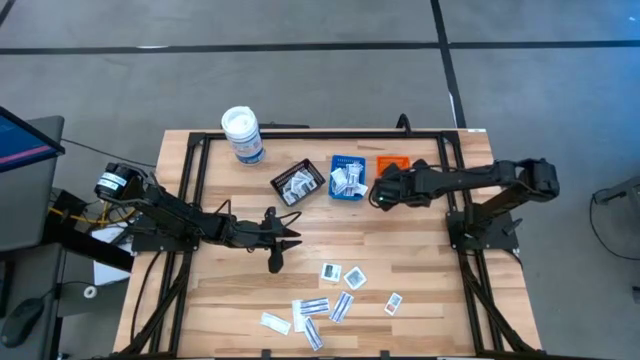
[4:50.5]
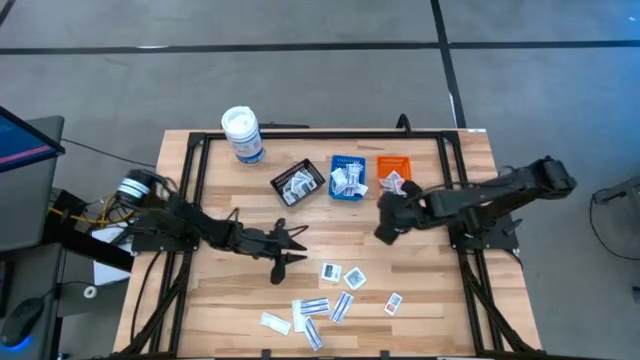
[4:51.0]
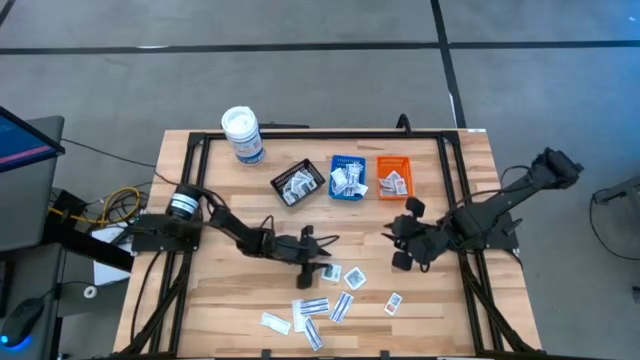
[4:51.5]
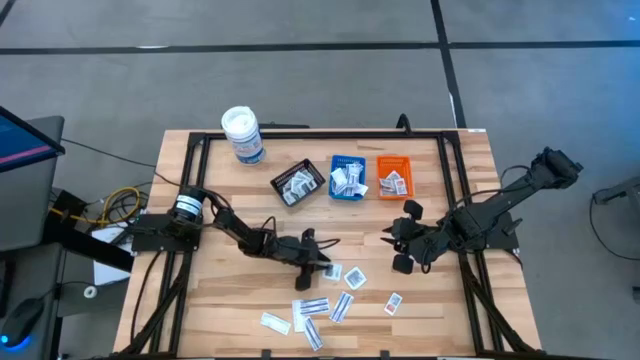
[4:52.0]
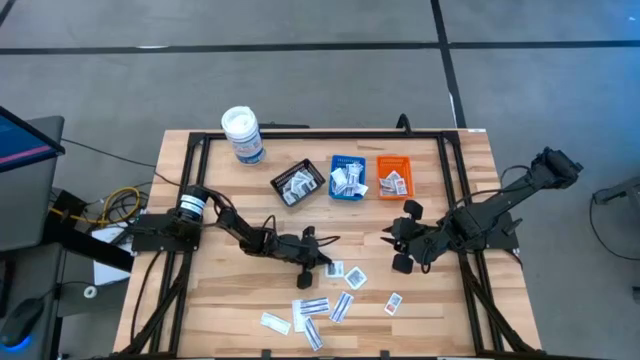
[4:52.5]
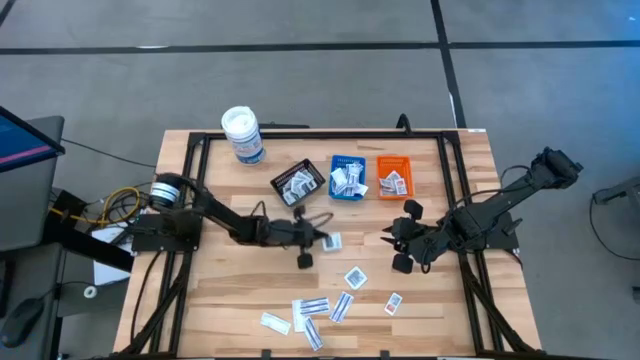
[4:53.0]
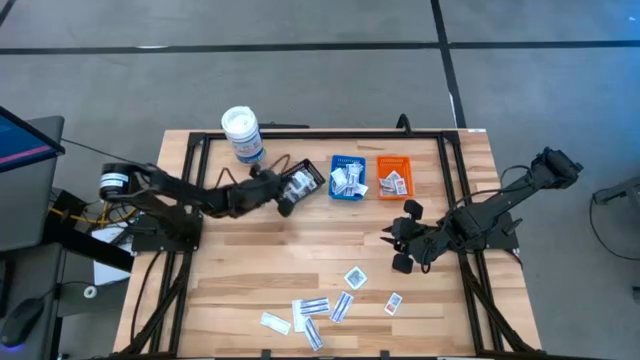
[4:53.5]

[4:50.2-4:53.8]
Task: Pick & Place First Aid Supplies
Put the black towelette pack into the black bin

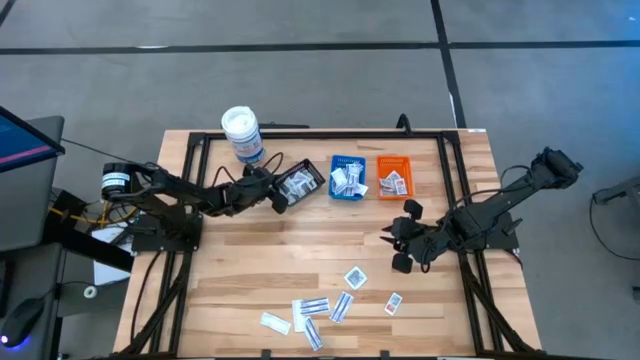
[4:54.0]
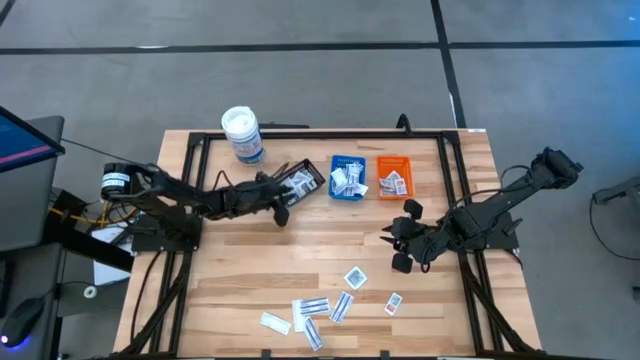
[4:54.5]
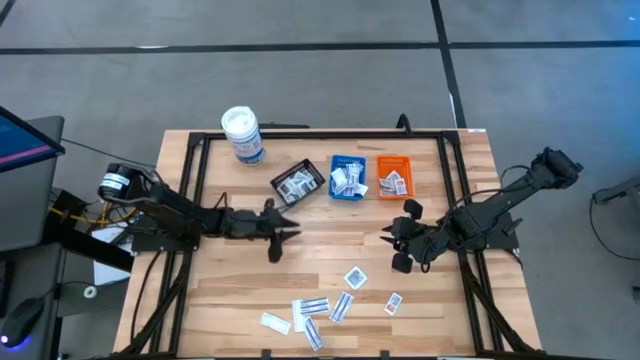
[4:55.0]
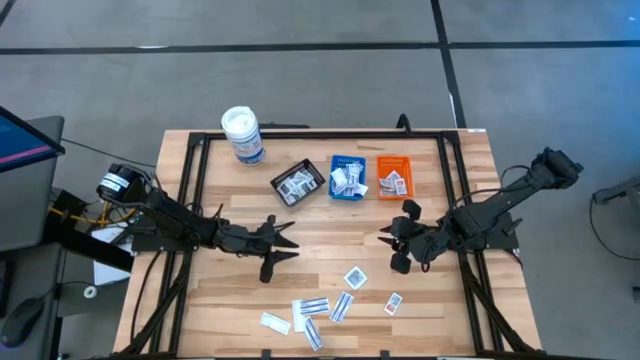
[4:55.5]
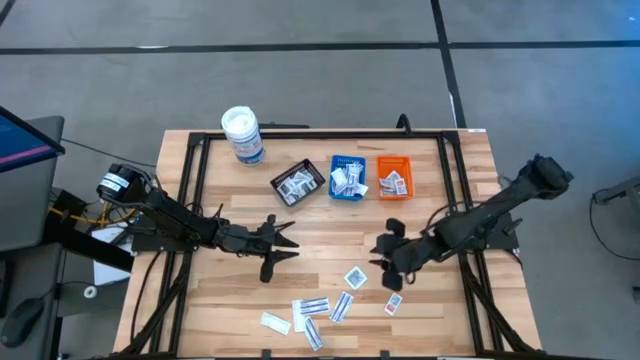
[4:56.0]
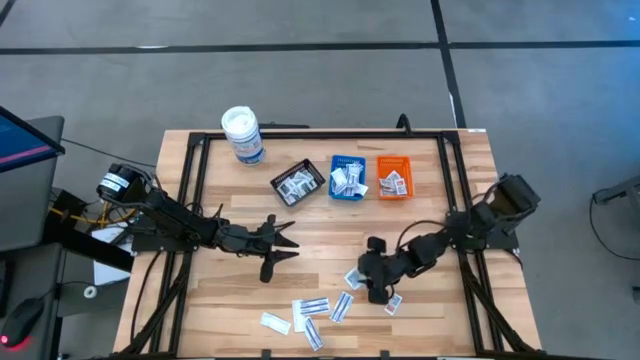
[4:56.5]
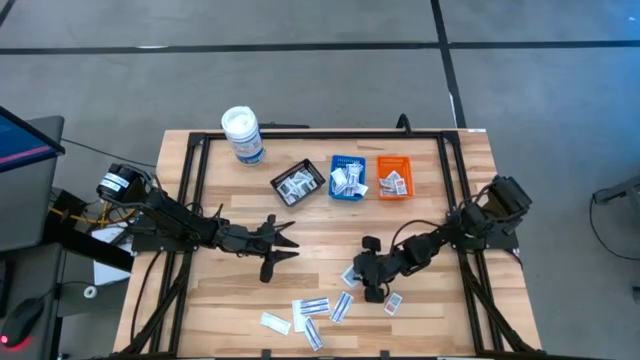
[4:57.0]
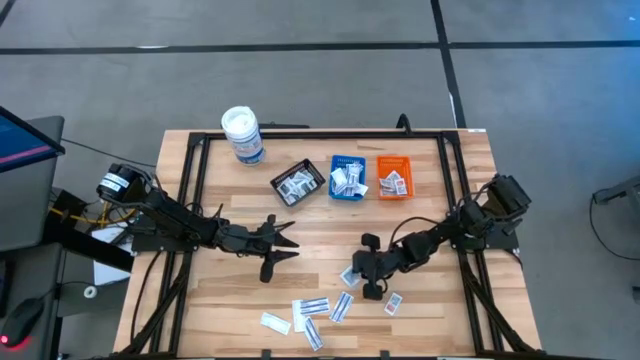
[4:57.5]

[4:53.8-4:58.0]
Put the black towelette pack into the black bin

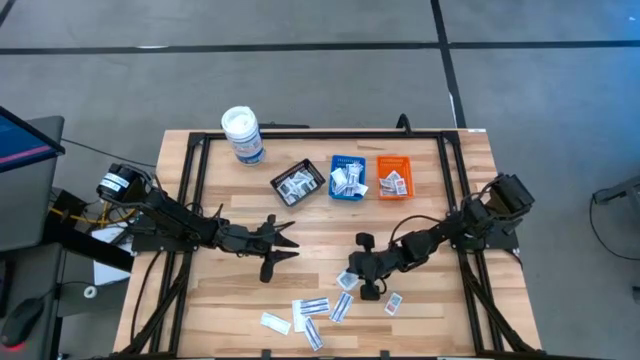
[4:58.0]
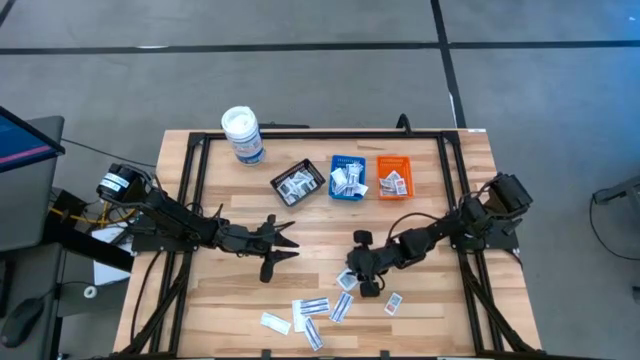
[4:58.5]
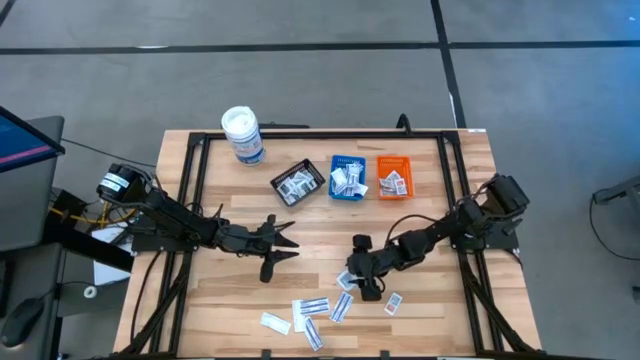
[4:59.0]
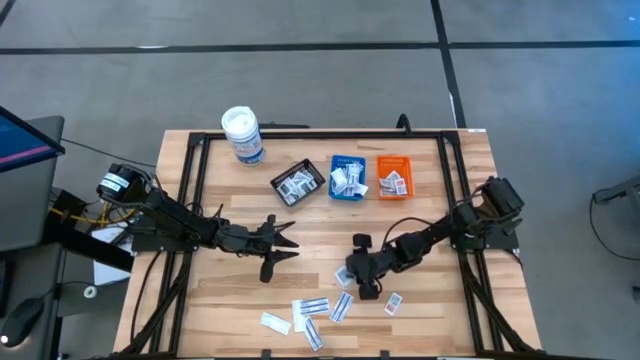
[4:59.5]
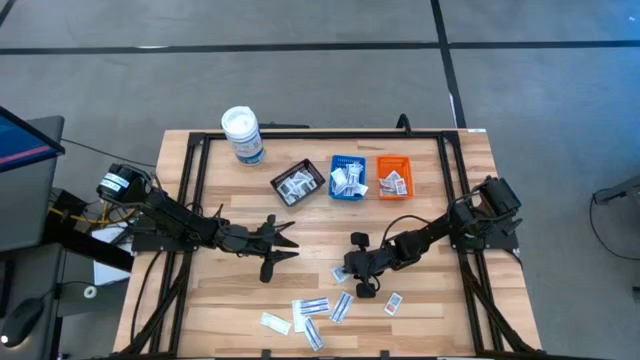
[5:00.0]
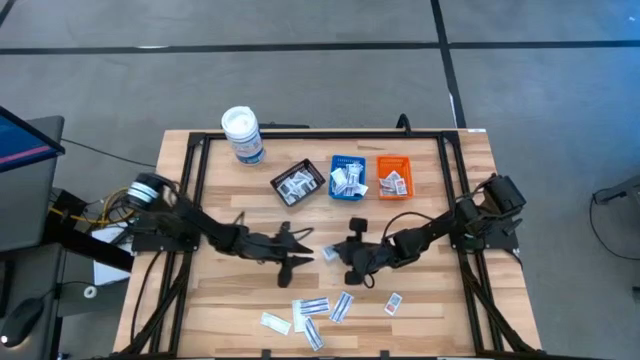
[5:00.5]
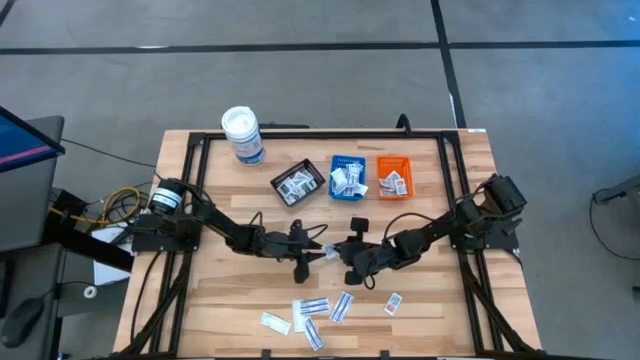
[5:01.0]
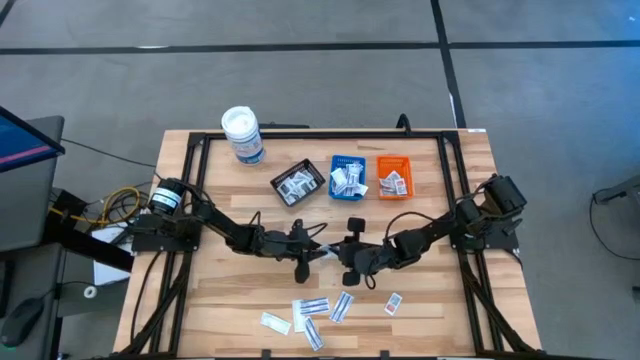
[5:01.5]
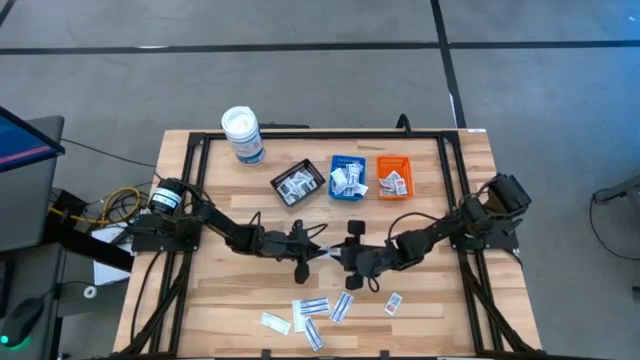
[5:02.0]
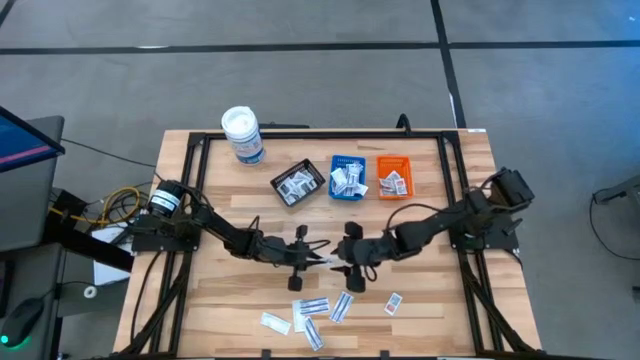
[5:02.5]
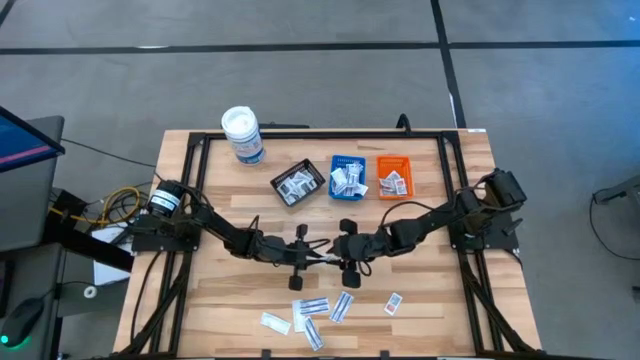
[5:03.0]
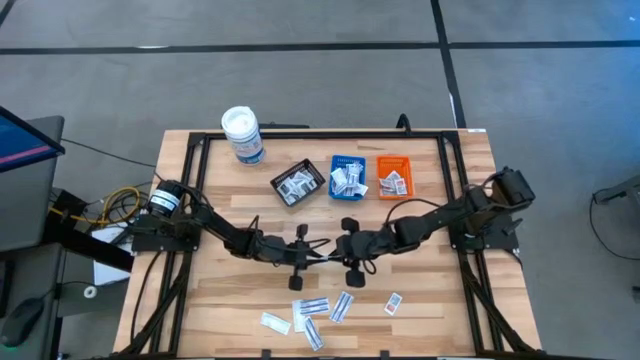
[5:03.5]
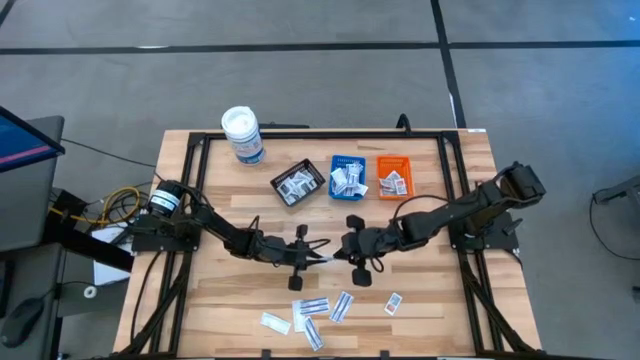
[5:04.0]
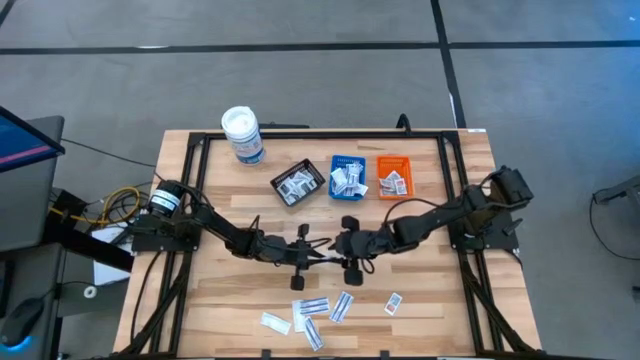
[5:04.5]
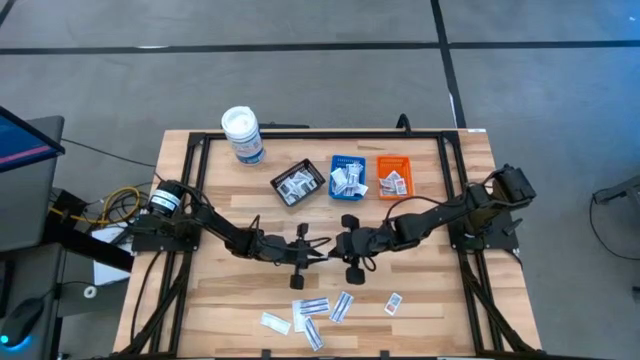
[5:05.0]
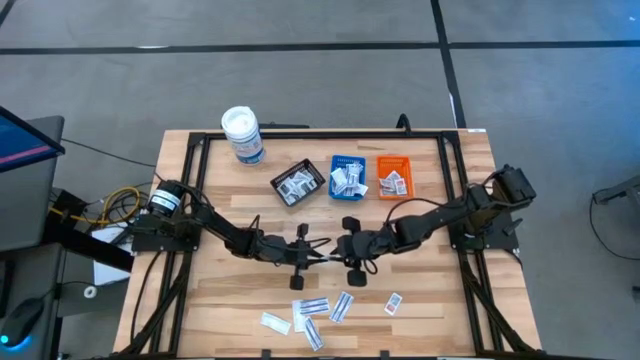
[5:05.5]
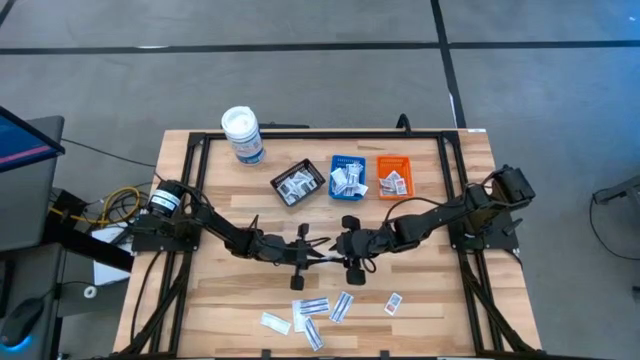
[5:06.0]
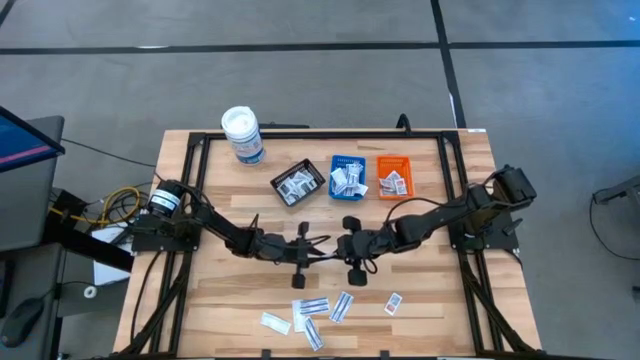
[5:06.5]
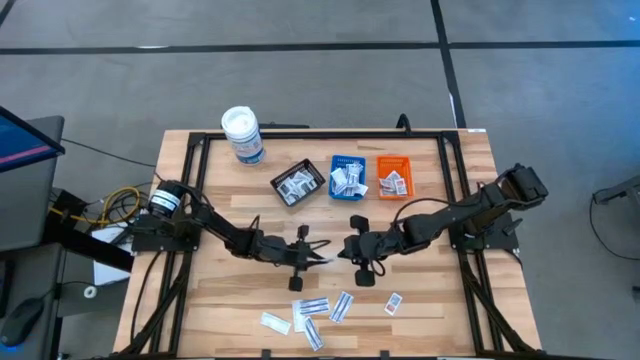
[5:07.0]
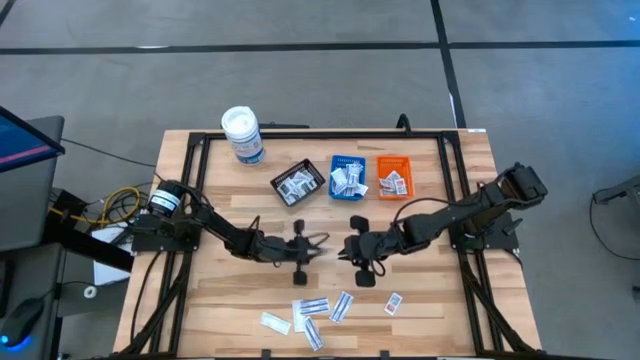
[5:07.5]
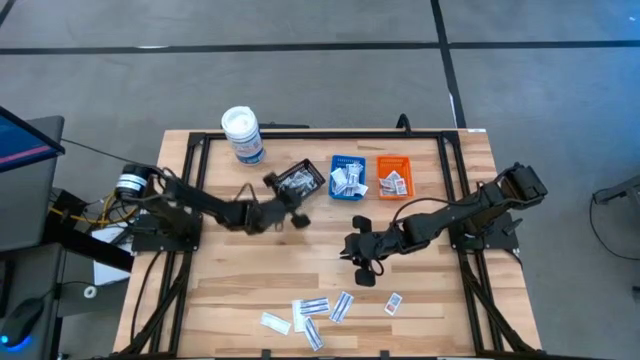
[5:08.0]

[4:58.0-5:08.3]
Put the black towelette pack into the black bin

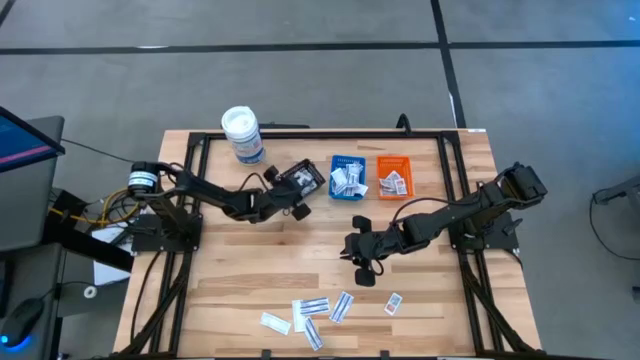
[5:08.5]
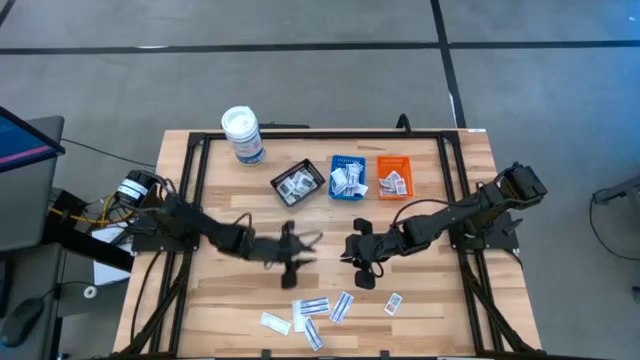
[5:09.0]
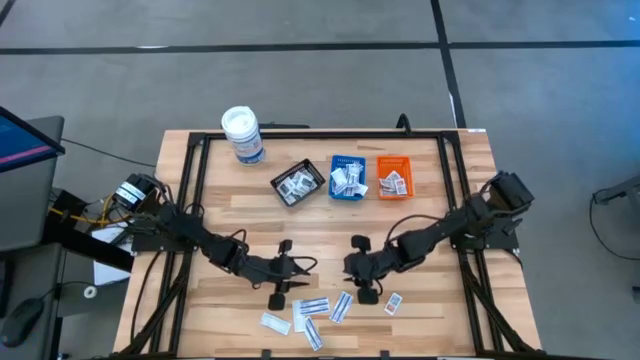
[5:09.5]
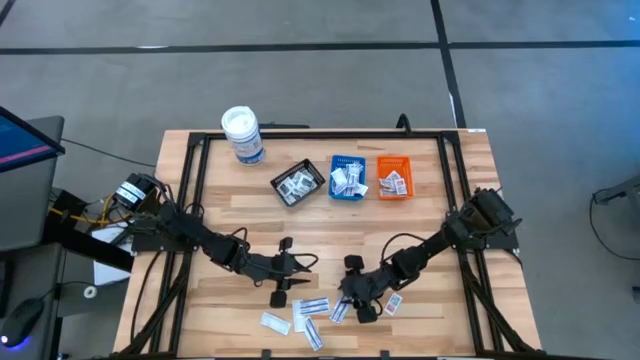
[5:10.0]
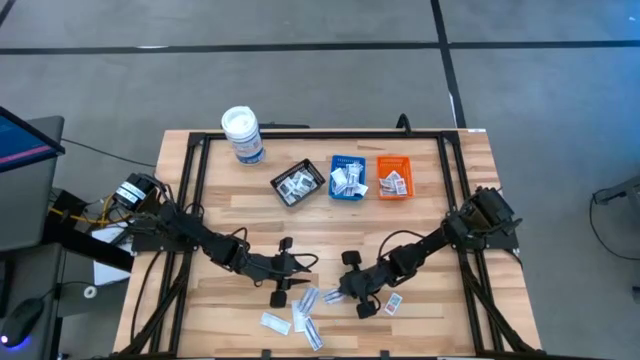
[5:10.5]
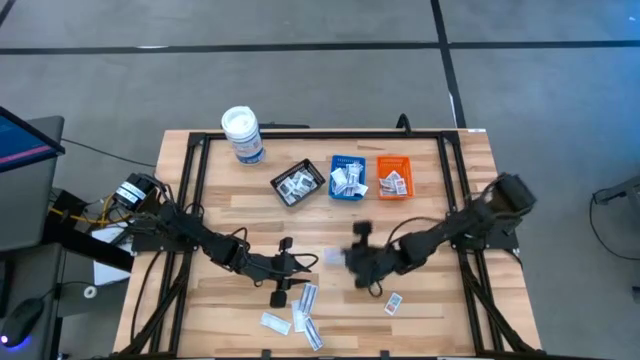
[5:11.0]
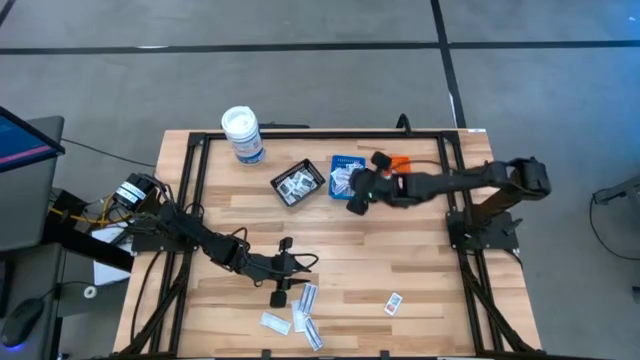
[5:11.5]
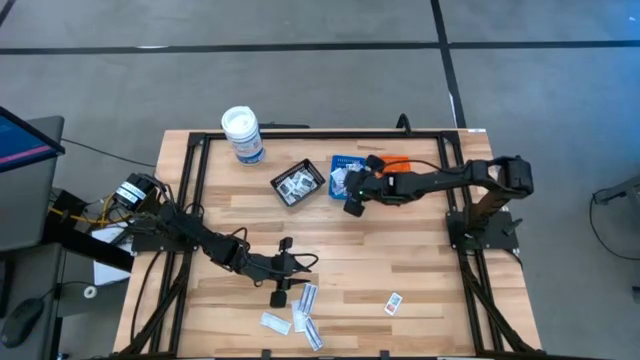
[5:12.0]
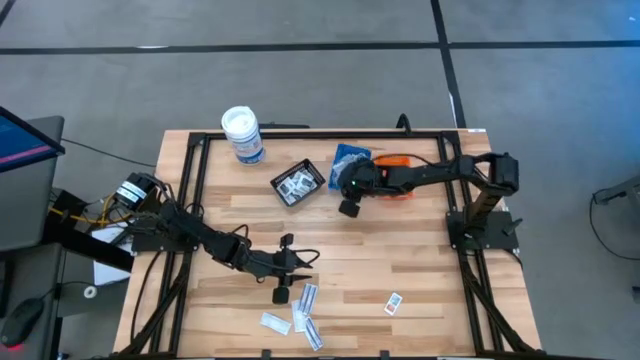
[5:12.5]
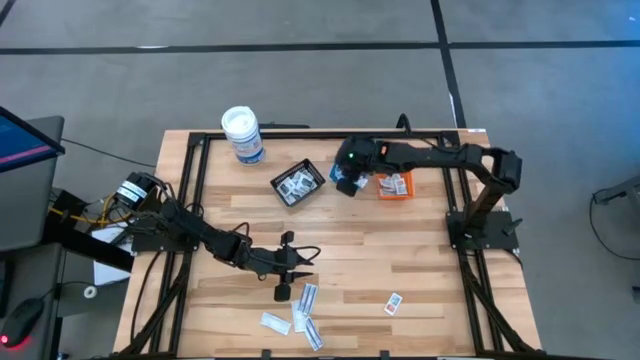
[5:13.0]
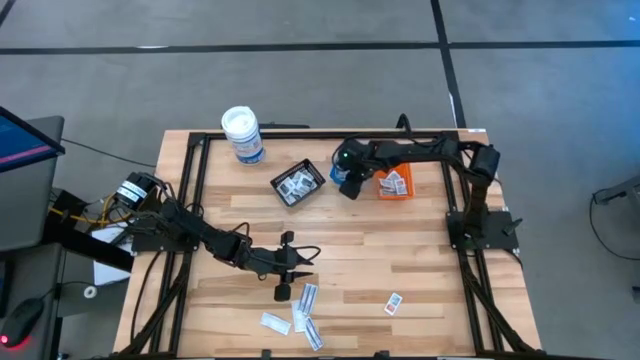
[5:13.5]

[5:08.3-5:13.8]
Put the blue bandage into the blue bin
